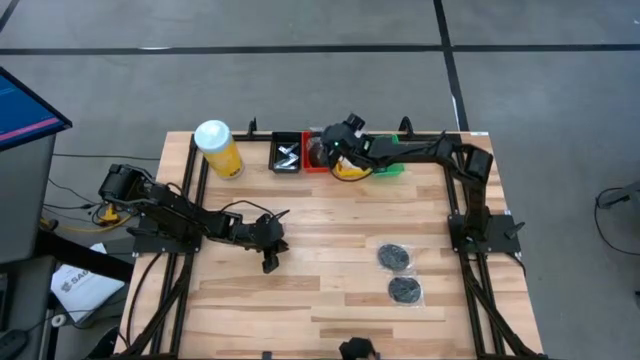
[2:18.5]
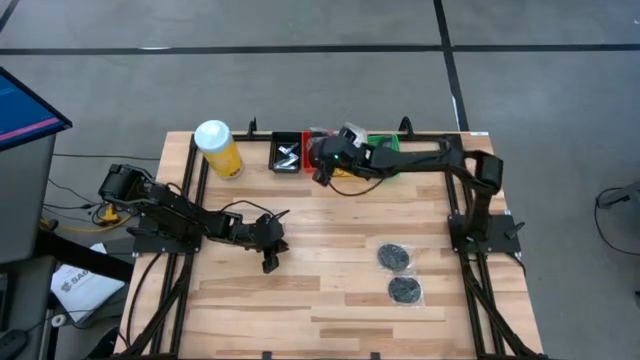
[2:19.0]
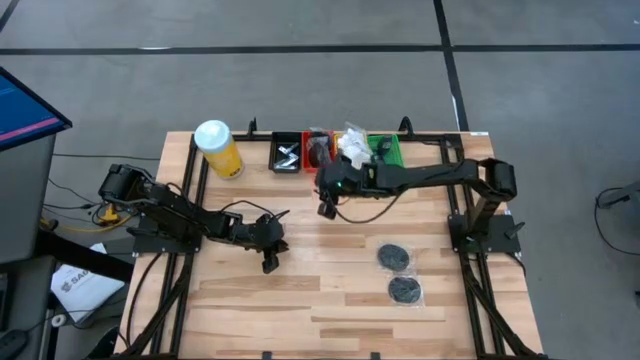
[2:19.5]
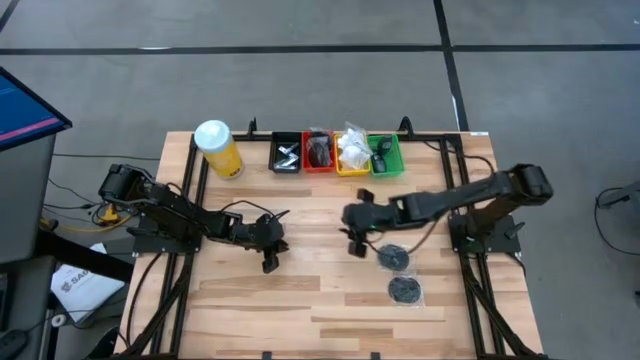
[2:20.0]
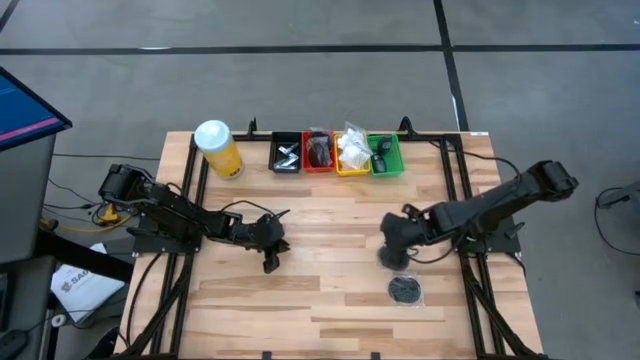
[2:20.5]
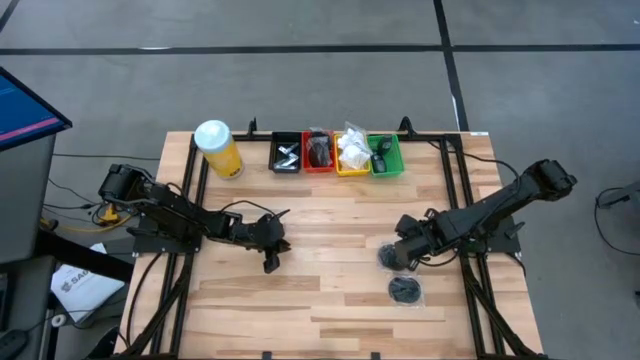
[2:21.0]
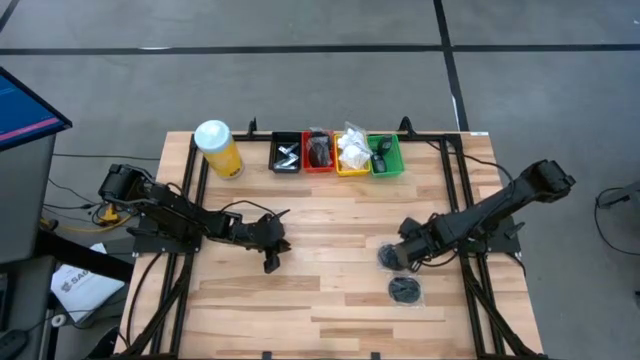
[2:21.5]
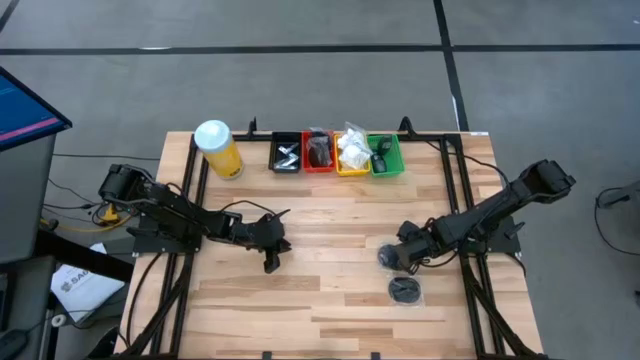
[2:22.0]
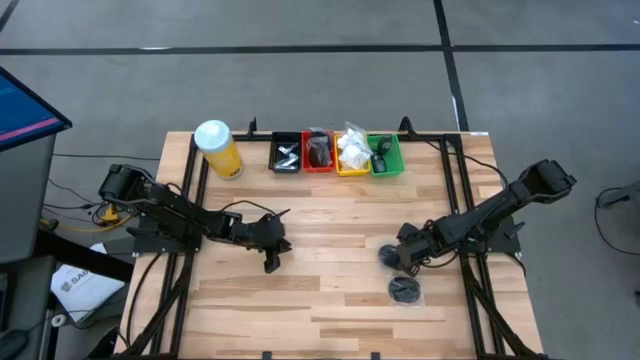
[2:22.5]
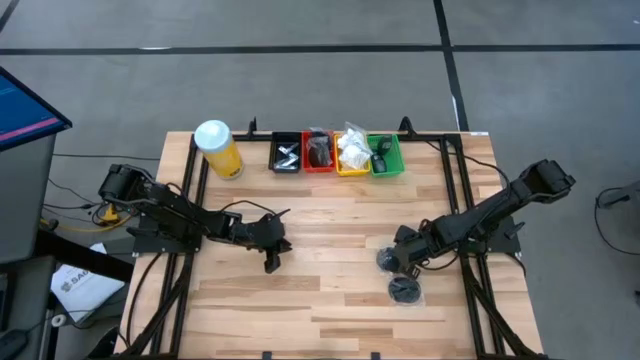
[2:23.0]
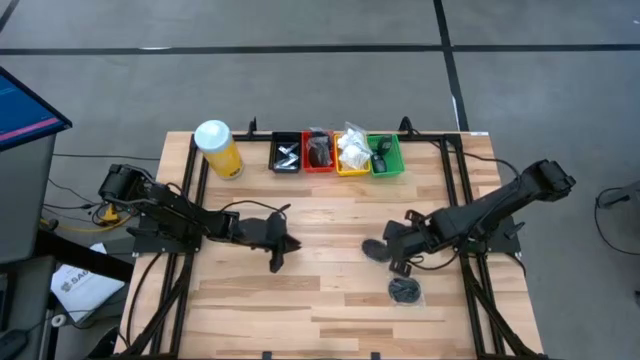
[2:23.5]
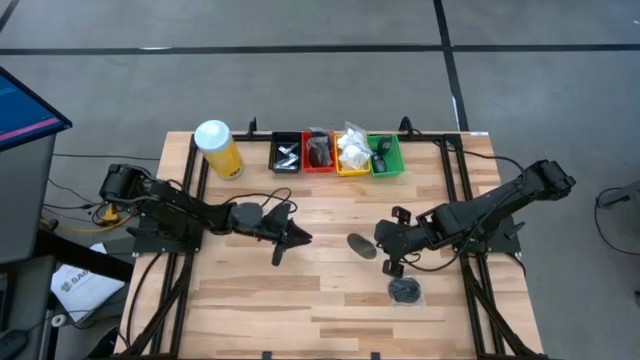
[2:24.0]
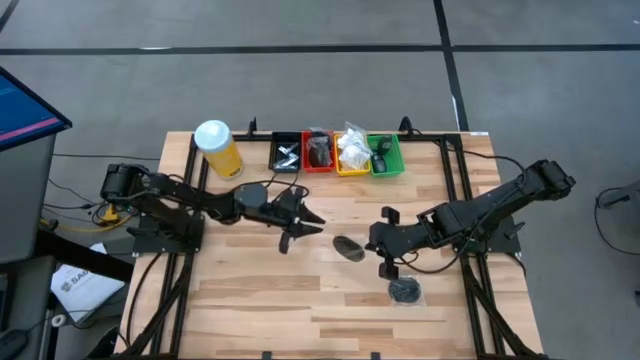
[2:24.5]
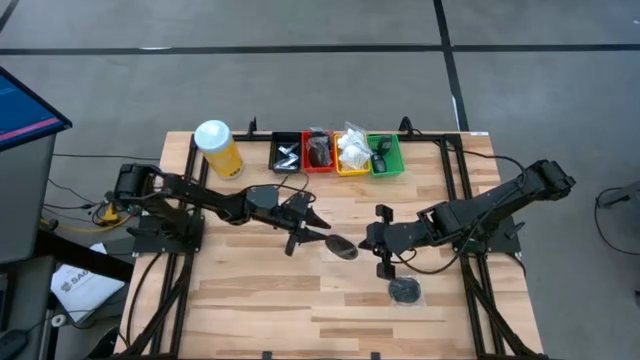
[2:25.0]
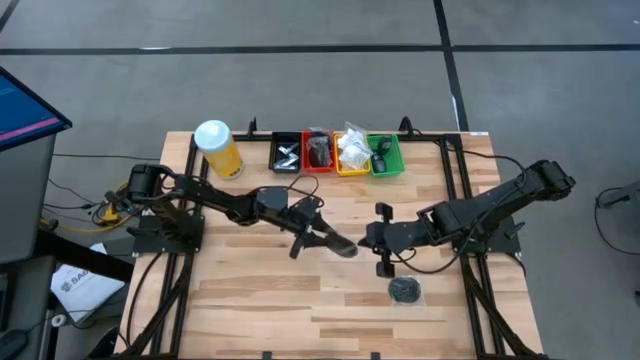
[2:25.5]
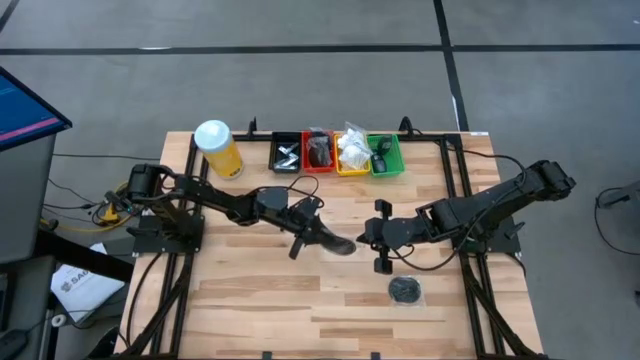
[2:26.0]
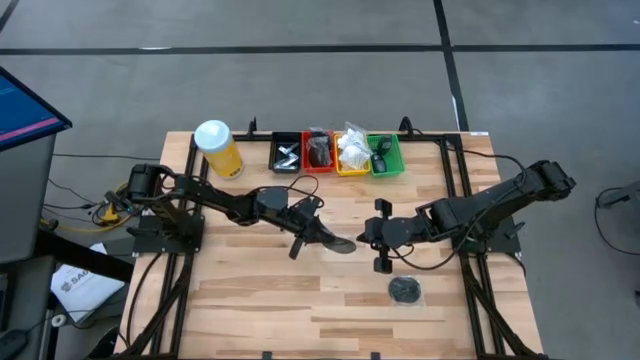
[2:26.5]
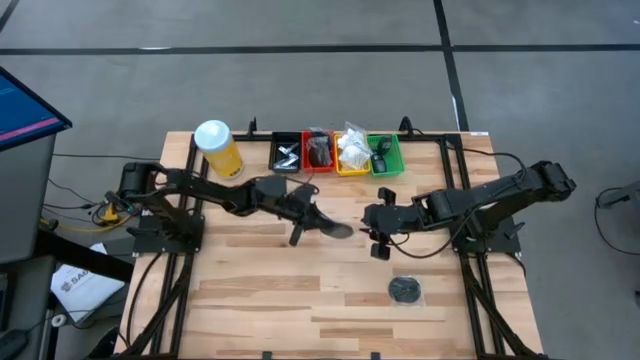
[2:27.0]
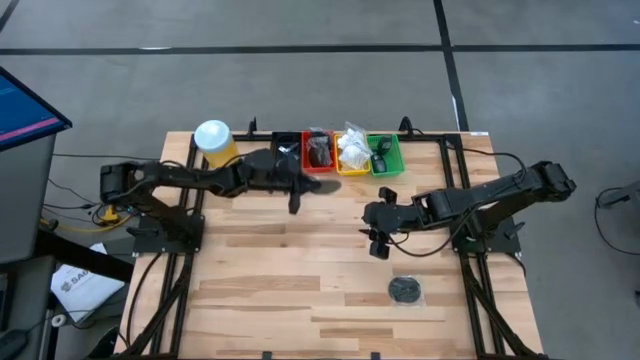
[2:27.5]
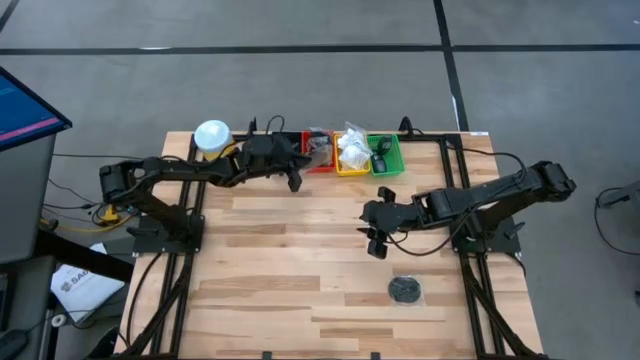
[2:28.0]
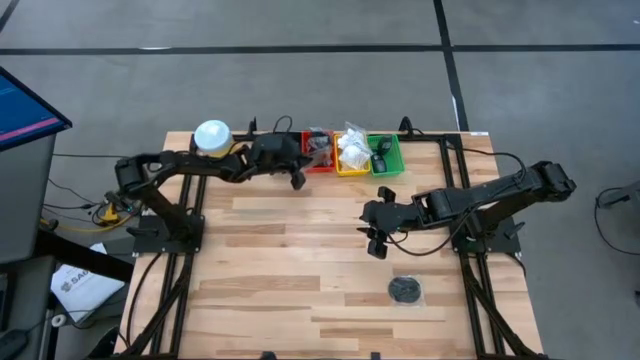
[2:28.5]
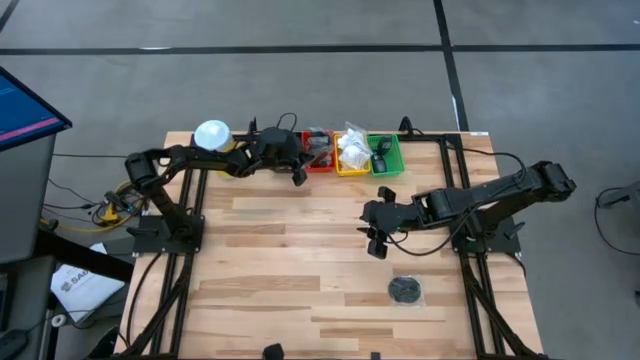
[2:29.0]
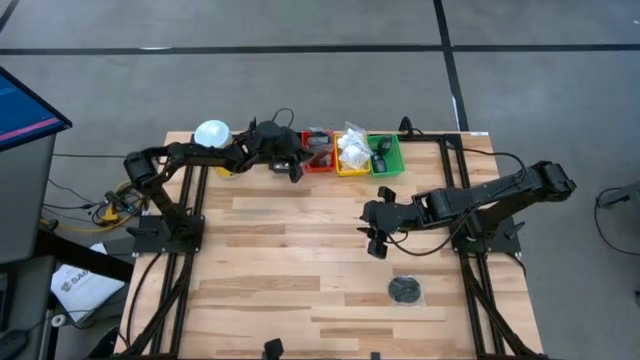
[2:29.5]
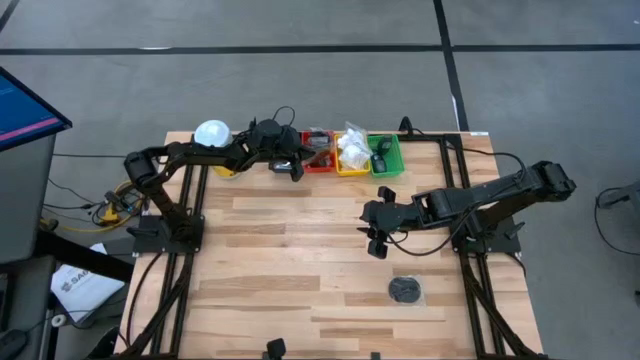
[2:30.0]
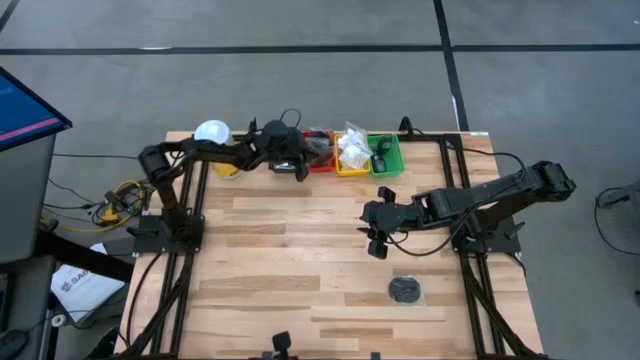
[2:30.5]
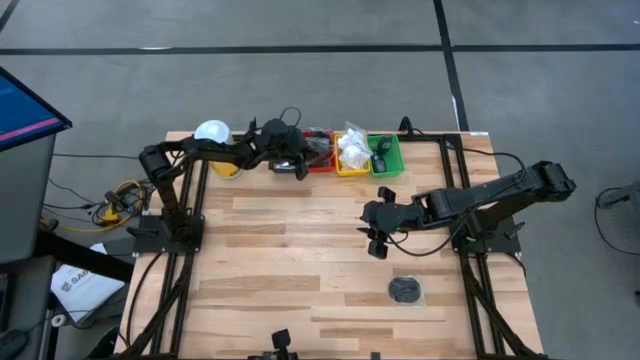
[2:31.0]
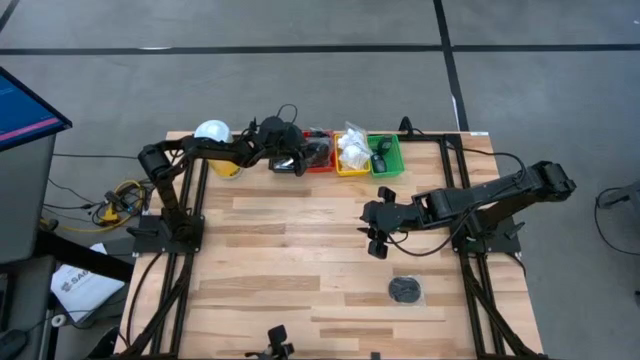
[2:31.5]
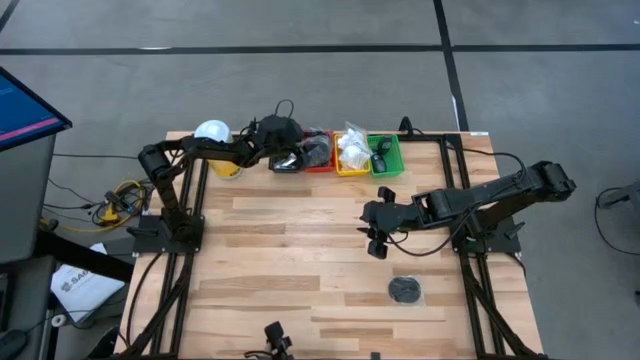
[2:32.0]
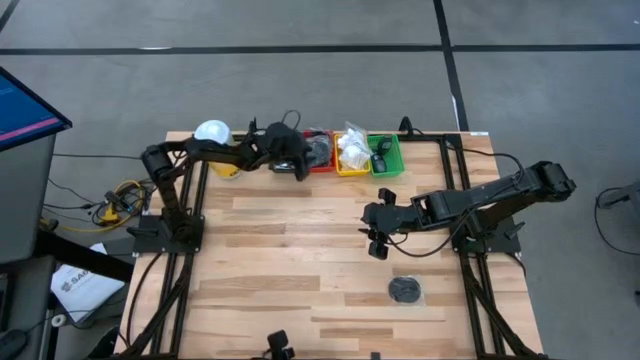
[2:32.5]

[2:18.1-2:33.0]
Task: Pick & Place Travel size toiletries
Put the hairbrush into the red bin

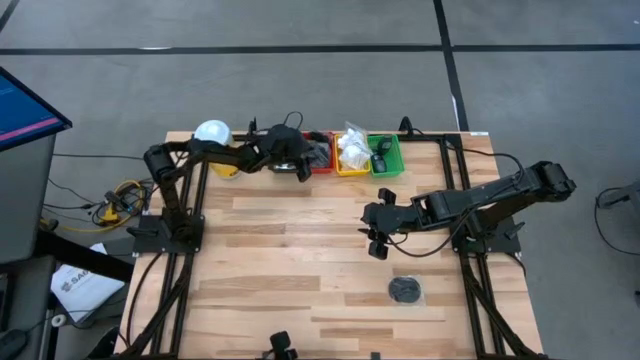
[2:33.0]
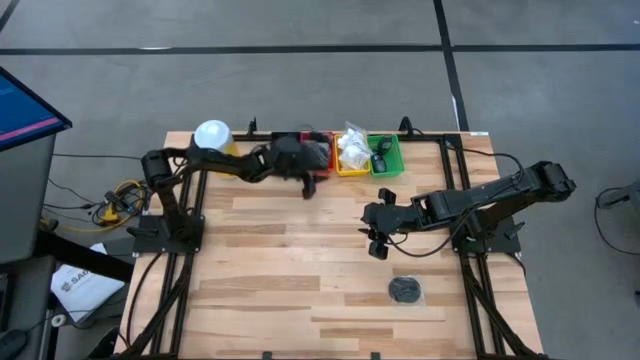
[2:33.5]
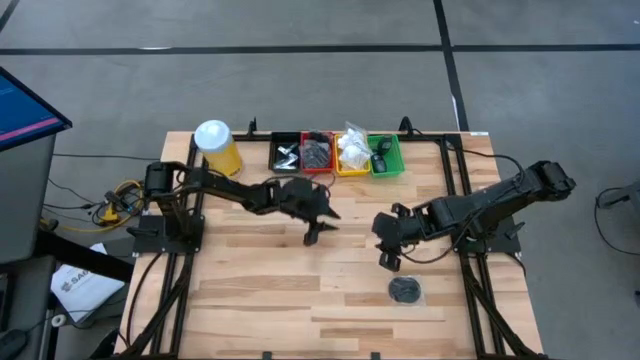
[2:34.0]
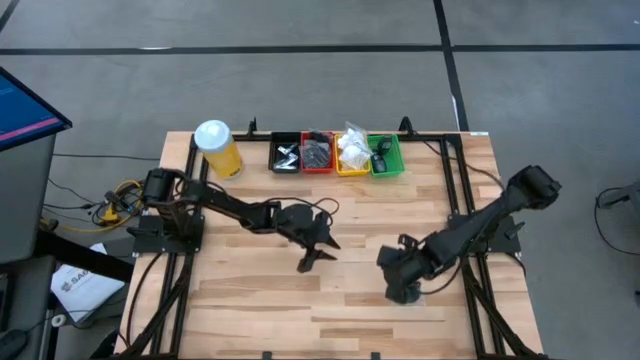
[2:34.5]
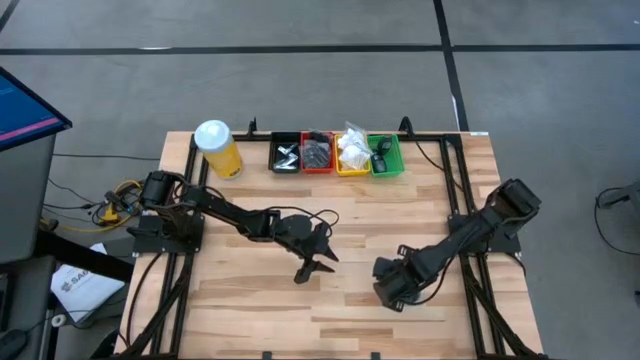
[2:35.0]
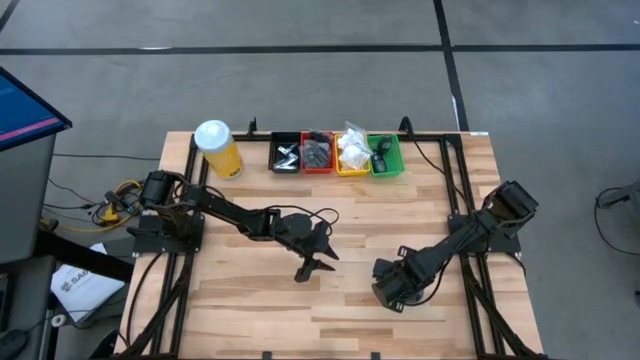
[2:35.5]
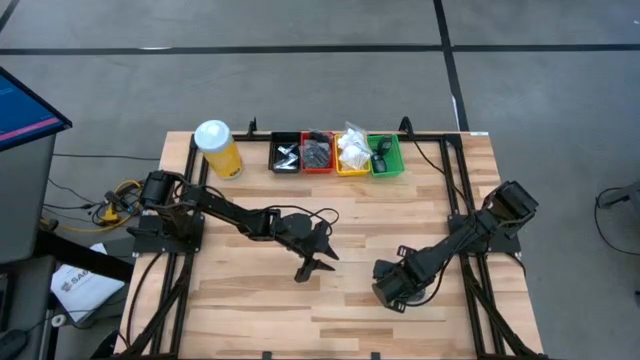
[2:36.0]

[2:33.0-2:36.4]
Put the hairbrush into the red bin
